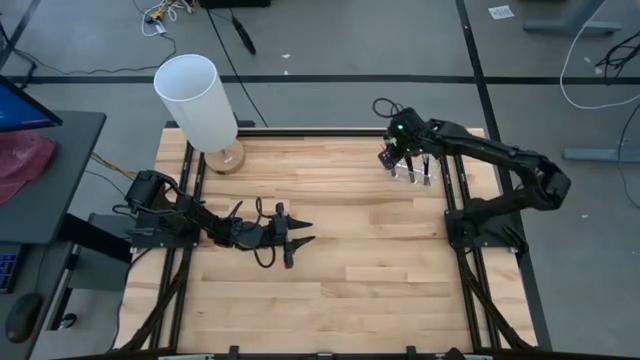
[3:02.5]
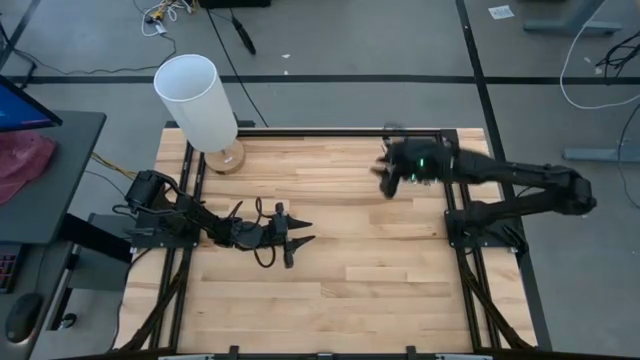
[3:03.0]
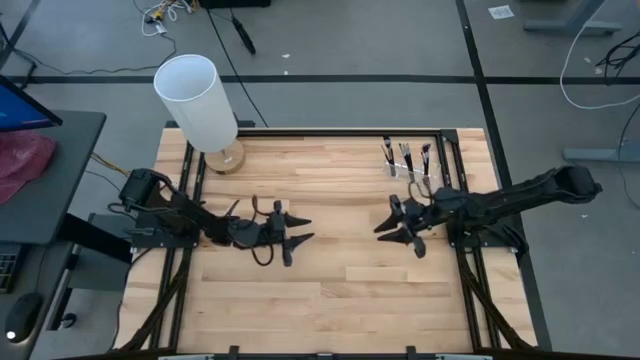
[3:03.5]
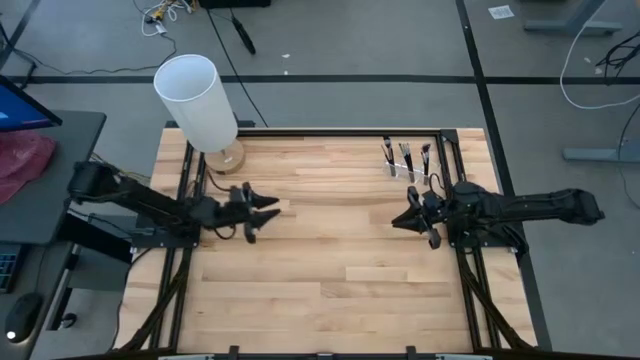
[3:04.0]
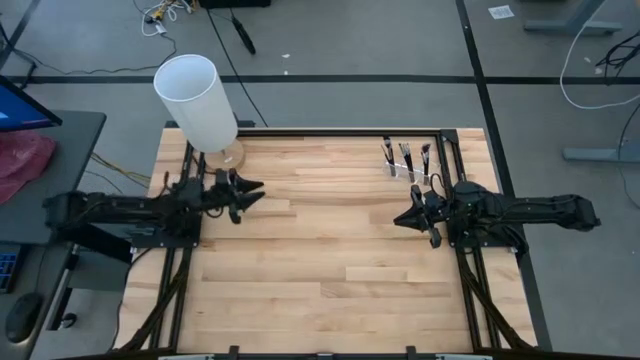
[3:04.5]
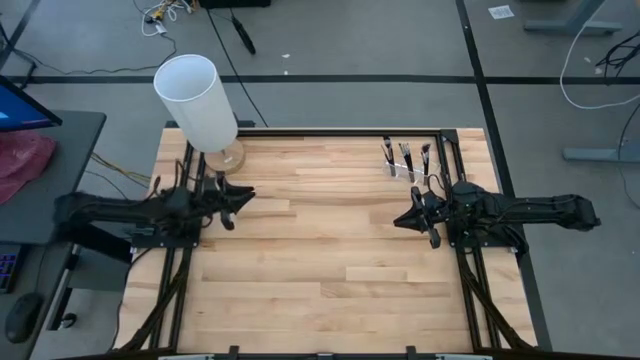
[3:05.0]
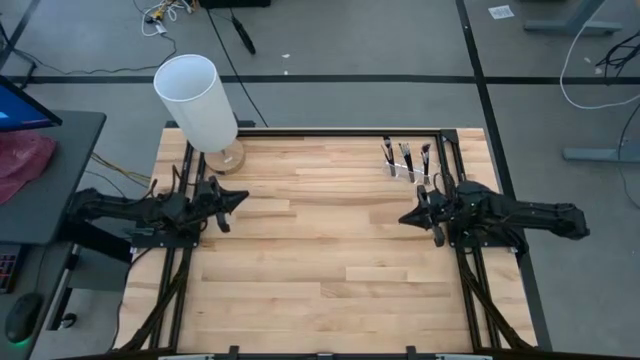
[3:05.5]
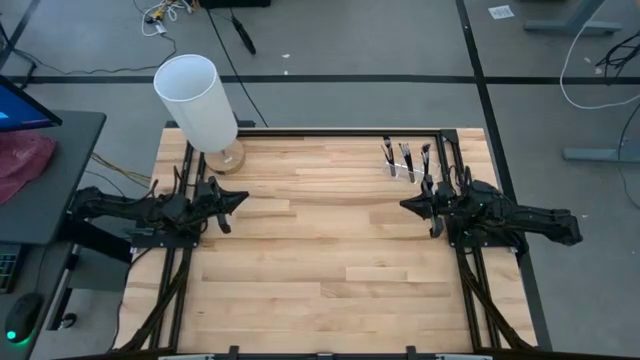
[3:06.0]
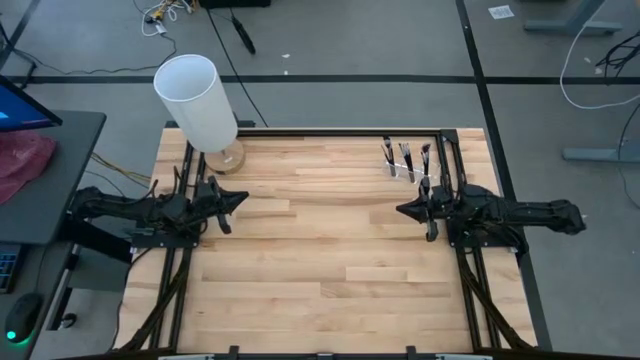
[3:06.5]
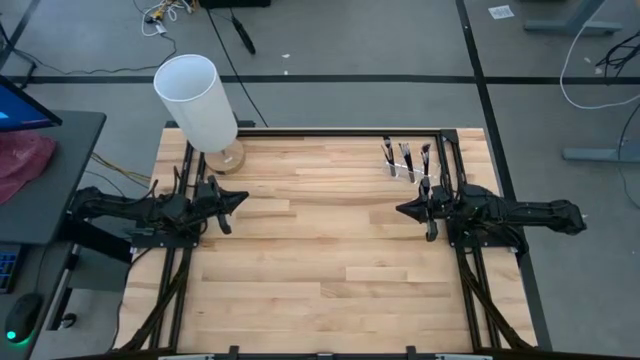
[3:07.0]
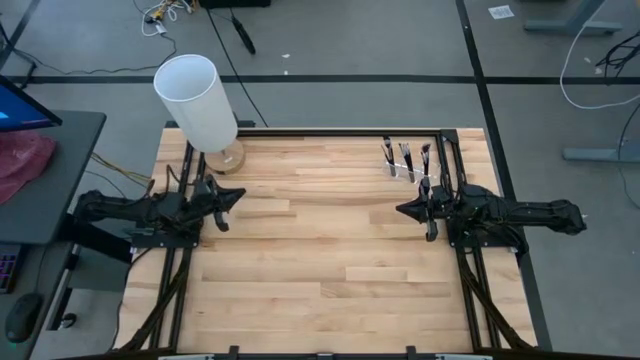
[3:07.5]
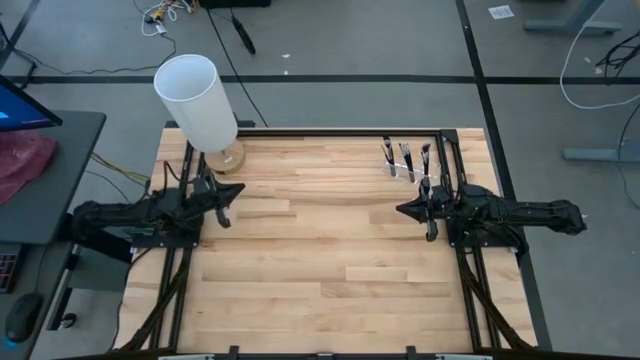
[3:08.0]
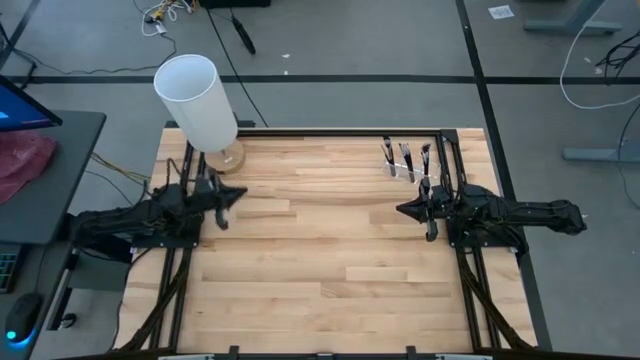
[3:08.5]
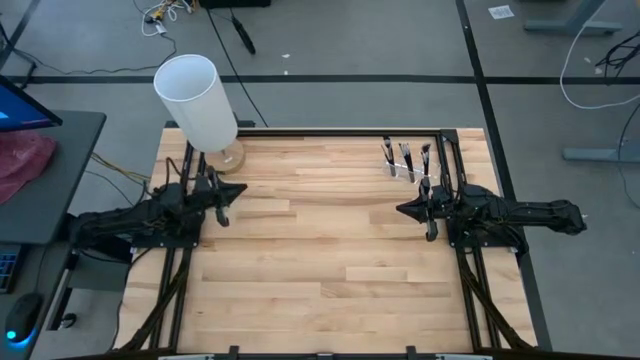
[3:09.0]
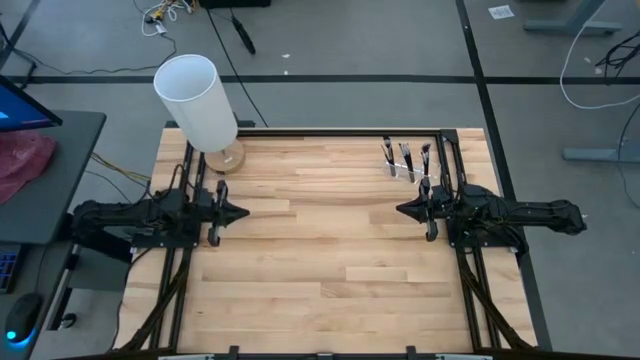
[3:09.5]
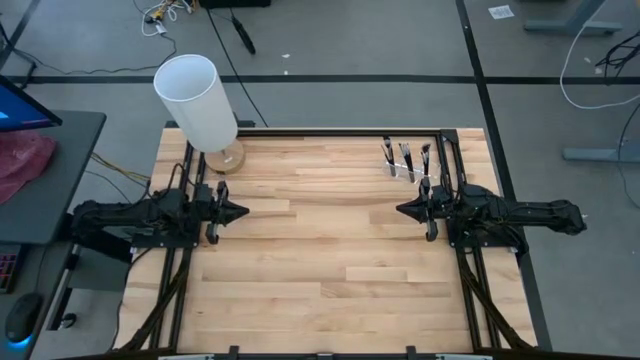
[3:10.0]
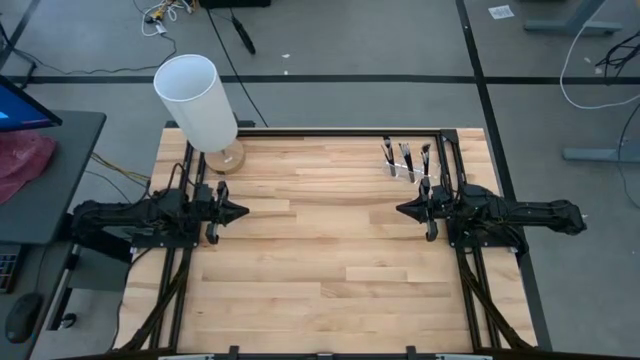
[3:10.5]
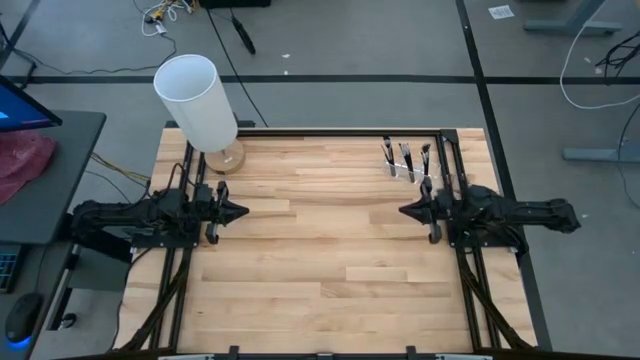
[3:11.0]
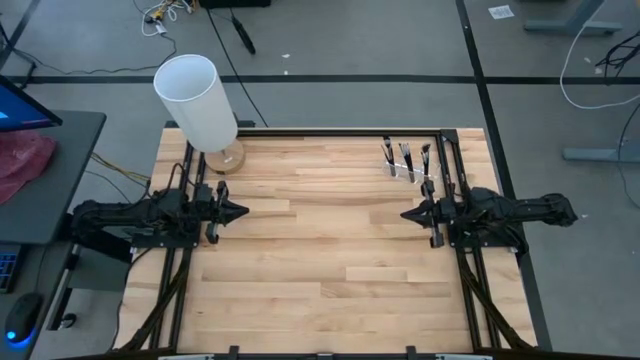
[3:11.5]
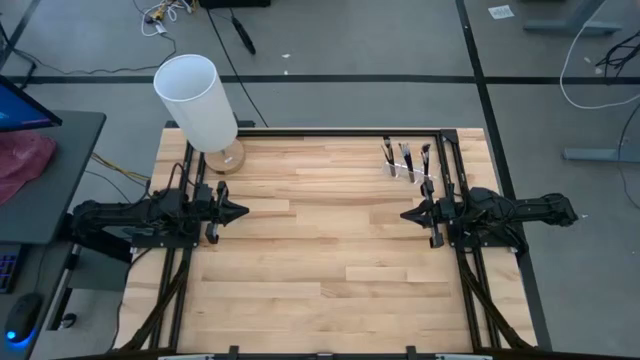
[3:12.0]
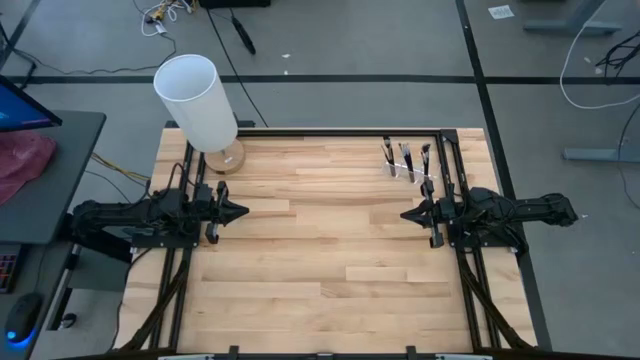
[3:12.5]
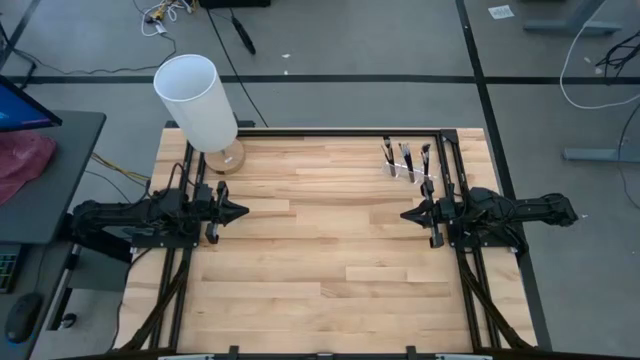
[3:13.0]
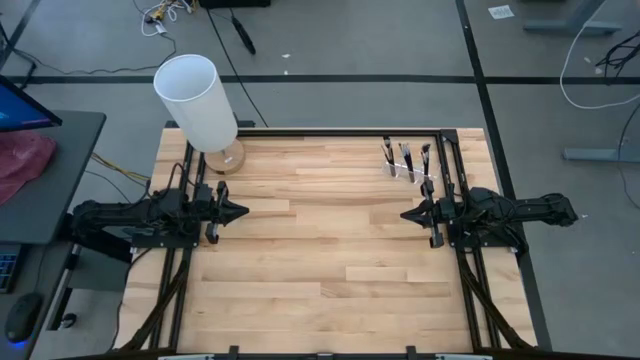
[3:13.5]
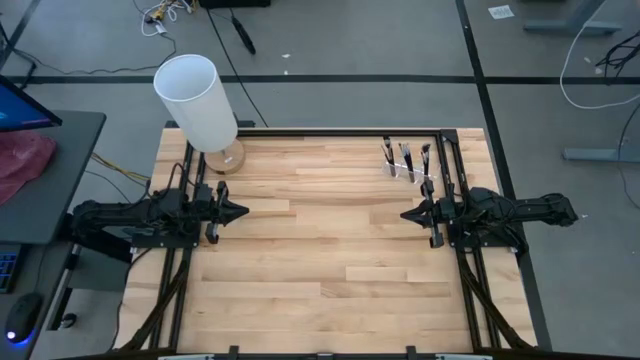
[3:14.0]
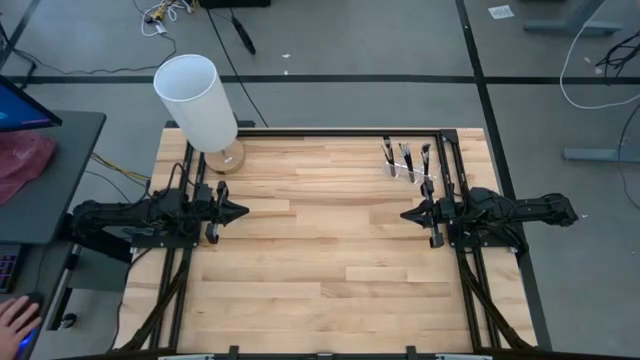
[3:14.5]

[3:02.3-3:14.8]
Task: Put items in baskets/containers
Return to Home Position

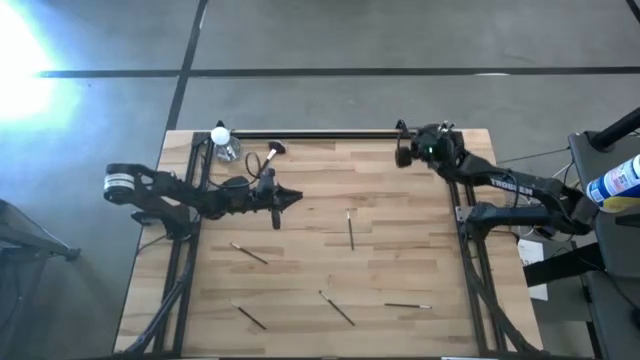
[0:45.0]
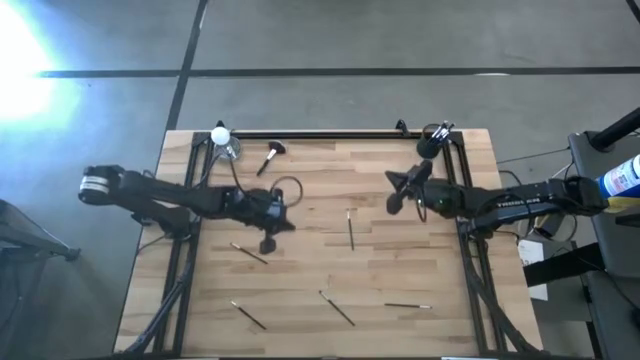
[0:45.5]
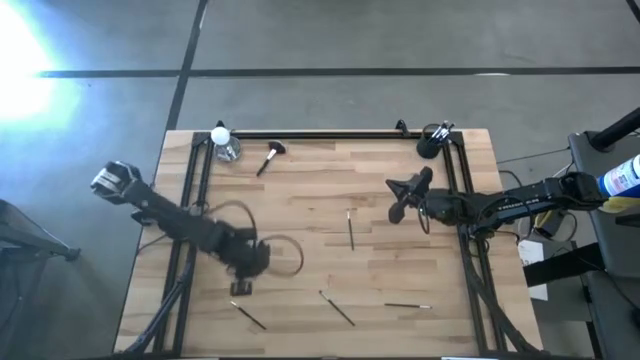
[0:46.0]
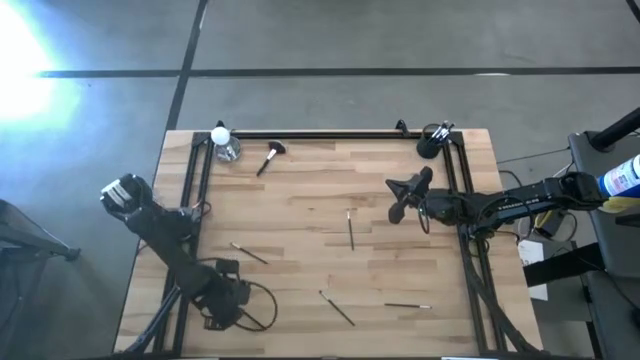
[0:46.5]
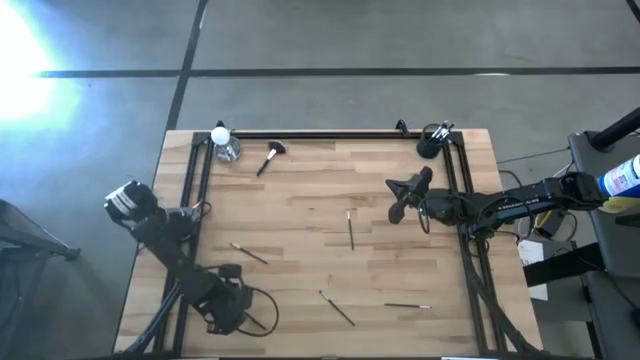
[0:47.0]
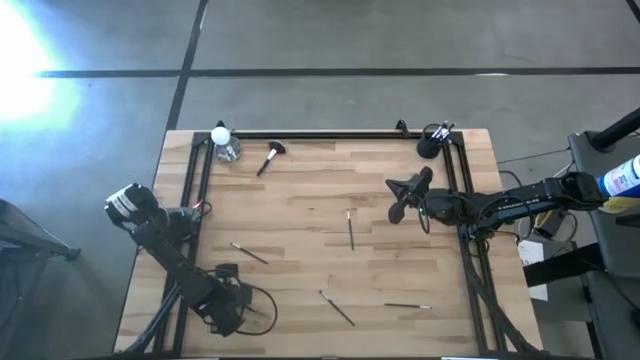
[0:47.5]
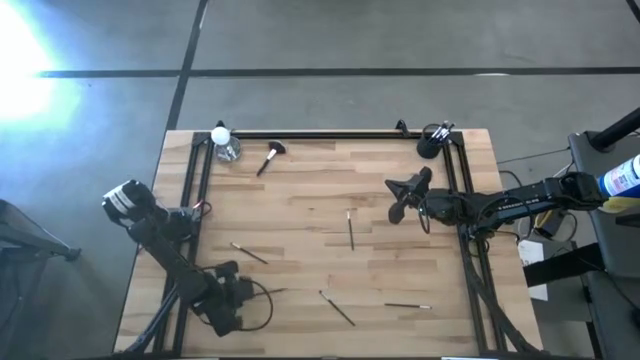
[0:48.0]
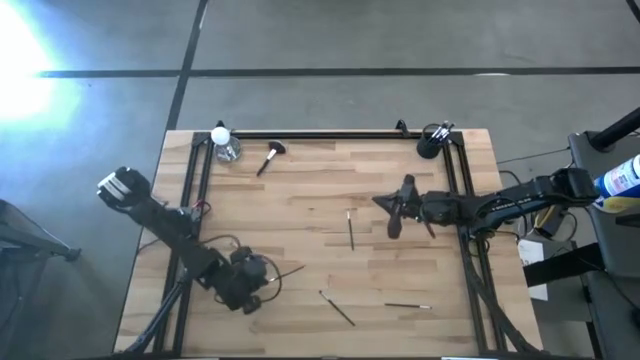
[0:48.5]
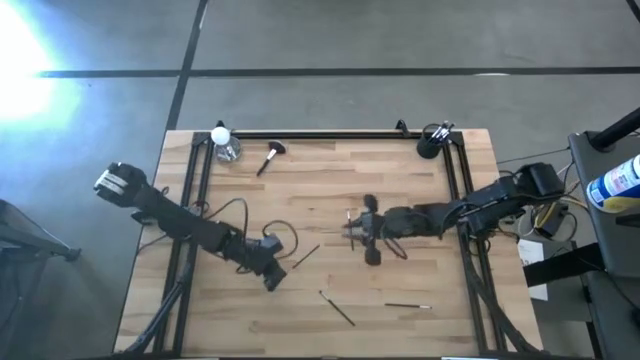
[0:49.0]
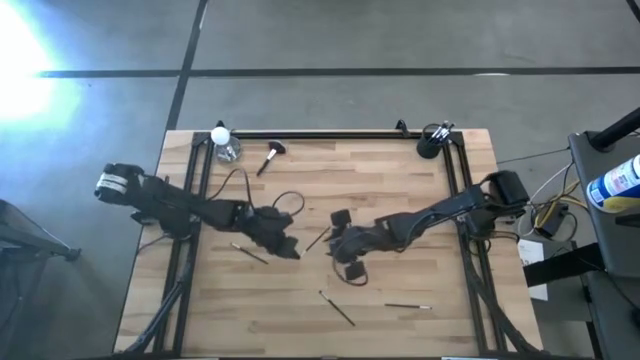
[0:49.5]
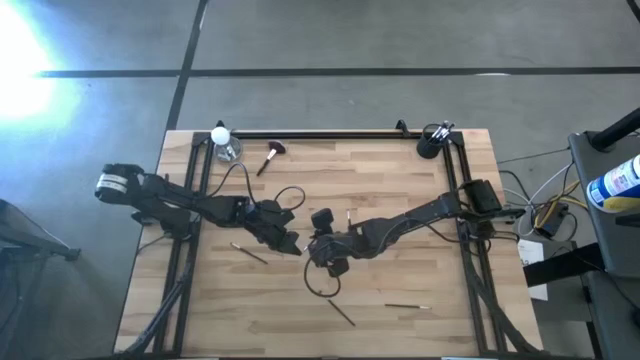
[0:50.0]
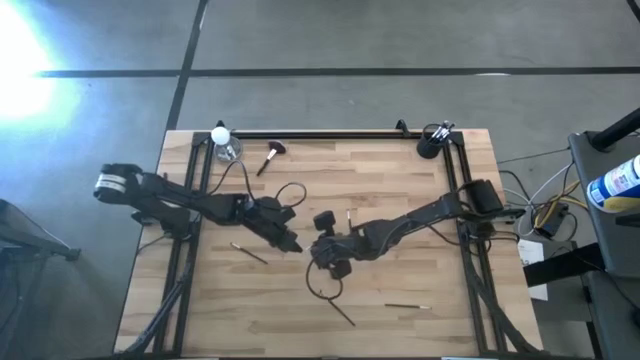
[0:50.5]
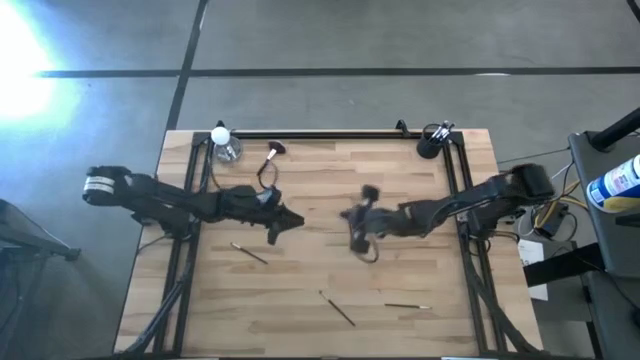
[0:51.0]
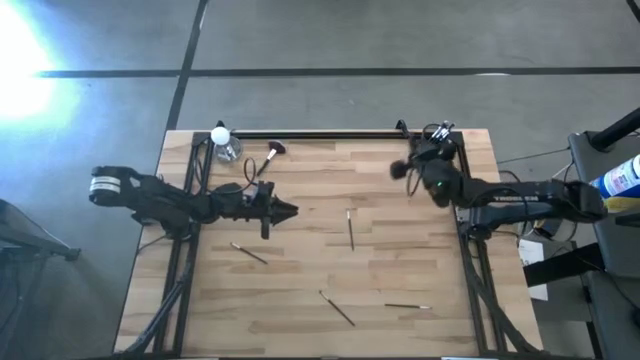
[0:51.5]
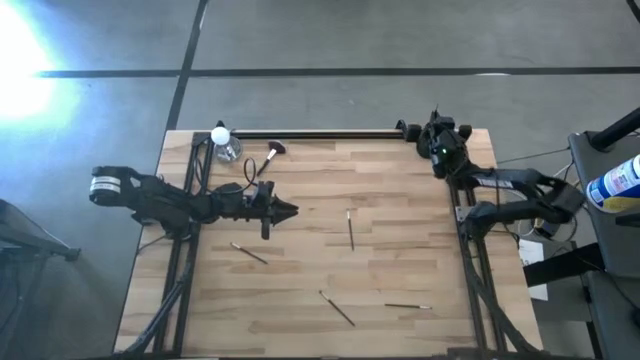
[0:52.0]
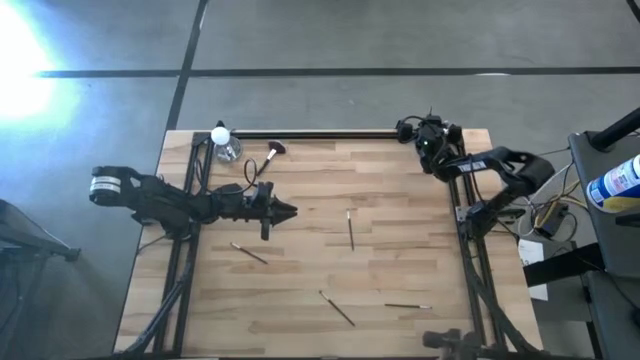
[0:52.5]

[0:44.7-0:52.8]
Task: Put items in baskets/containers
Put the liner brush into the mesh organizer
